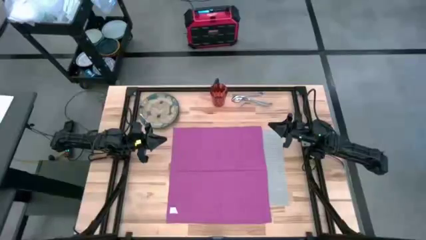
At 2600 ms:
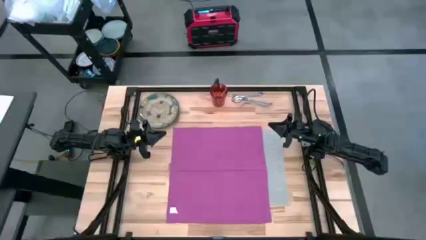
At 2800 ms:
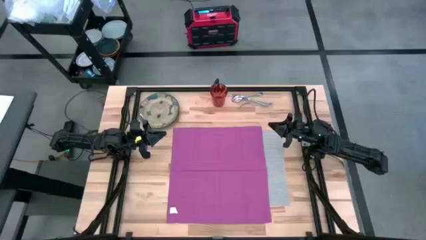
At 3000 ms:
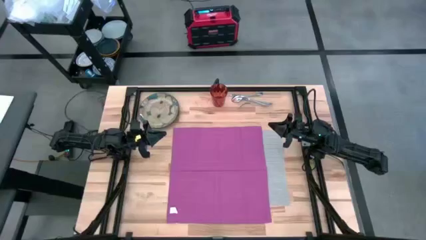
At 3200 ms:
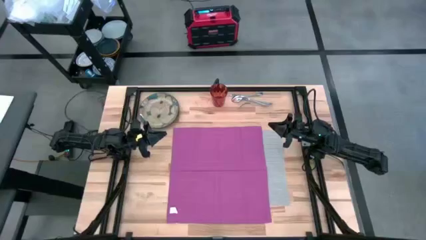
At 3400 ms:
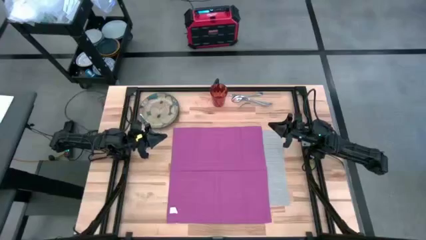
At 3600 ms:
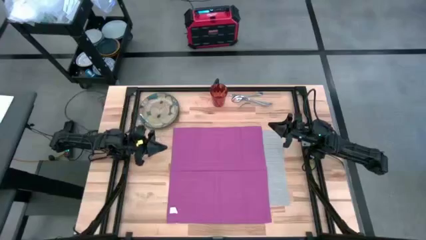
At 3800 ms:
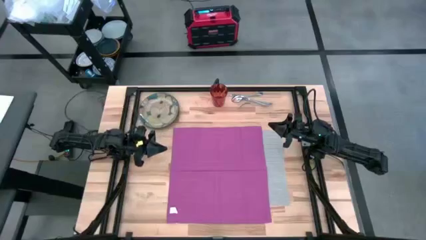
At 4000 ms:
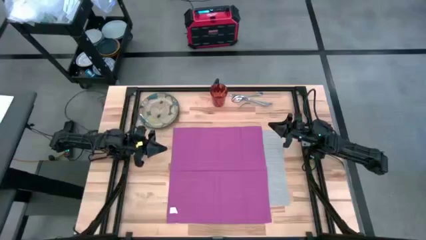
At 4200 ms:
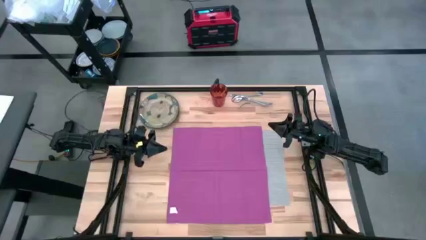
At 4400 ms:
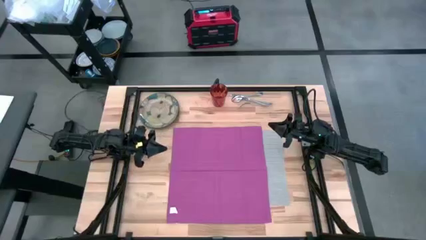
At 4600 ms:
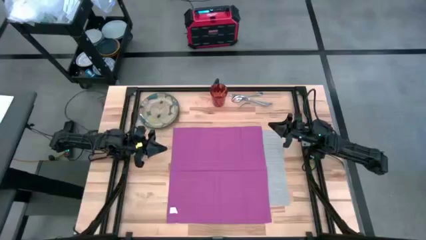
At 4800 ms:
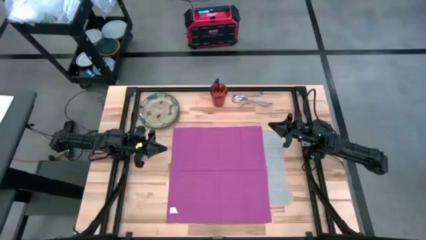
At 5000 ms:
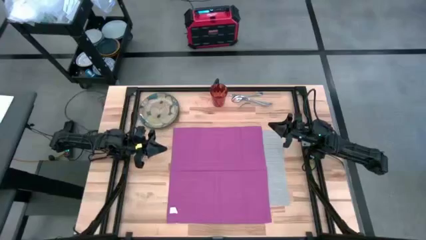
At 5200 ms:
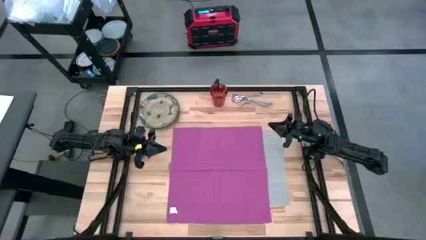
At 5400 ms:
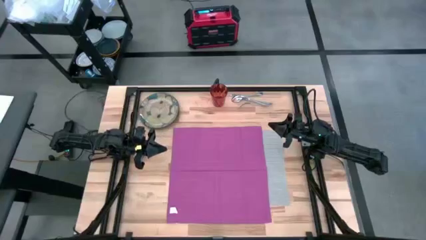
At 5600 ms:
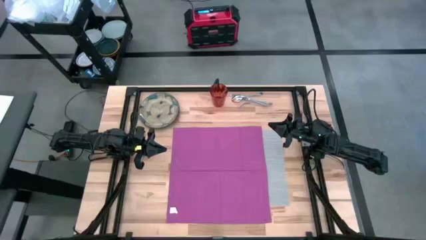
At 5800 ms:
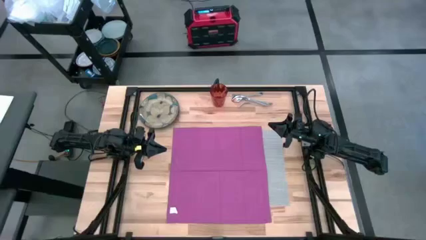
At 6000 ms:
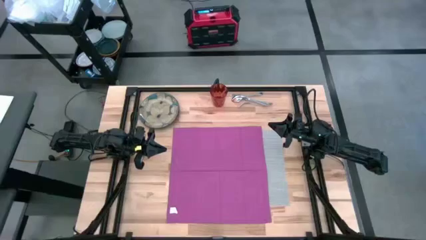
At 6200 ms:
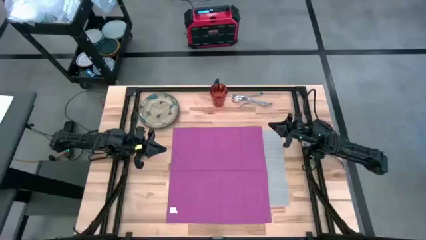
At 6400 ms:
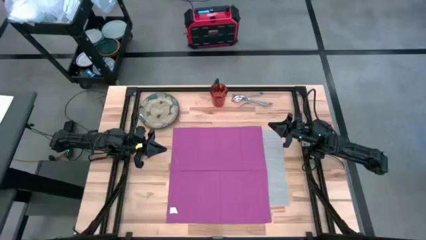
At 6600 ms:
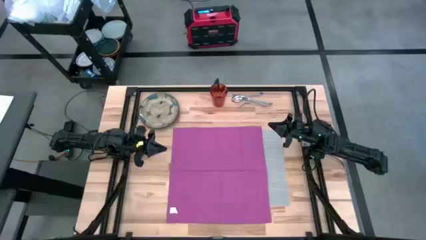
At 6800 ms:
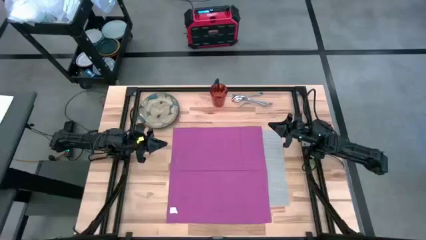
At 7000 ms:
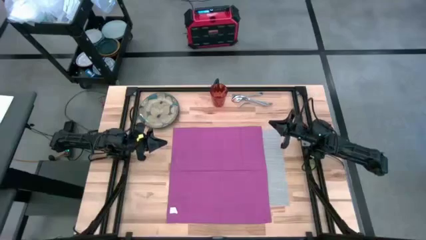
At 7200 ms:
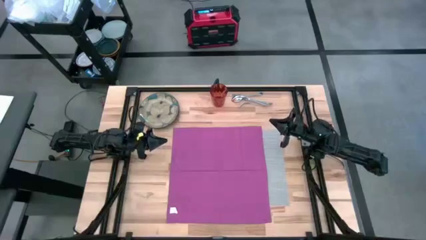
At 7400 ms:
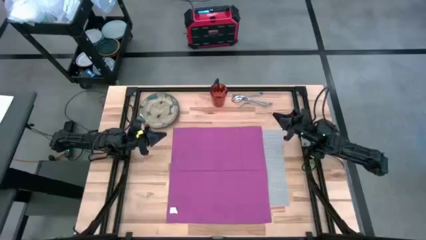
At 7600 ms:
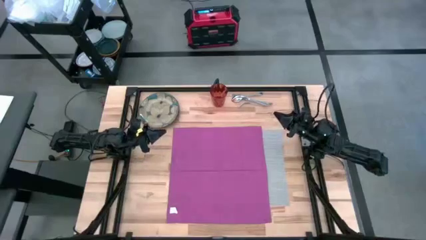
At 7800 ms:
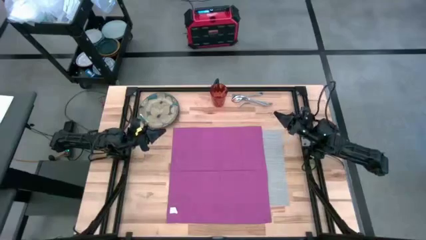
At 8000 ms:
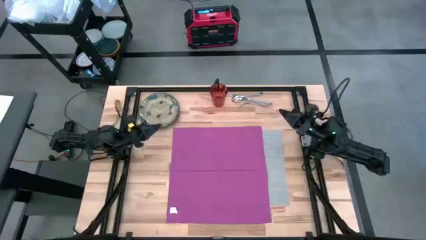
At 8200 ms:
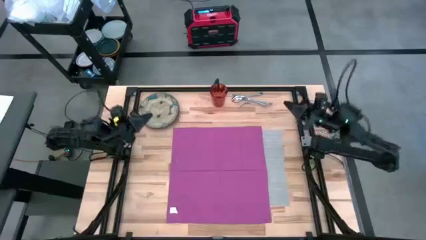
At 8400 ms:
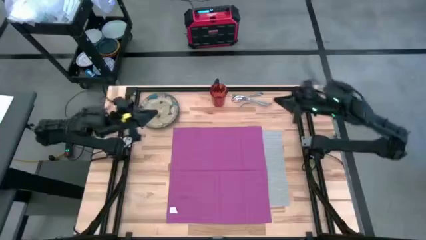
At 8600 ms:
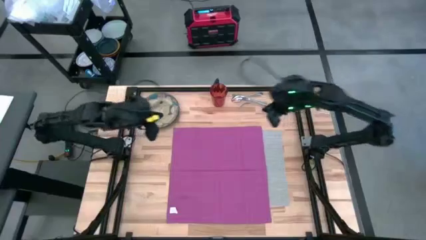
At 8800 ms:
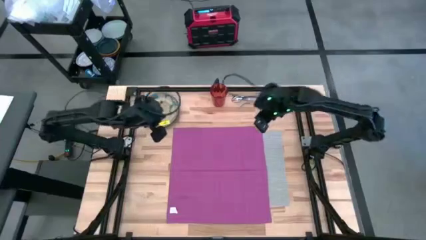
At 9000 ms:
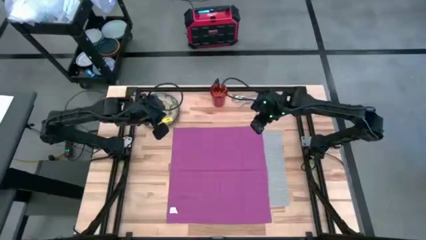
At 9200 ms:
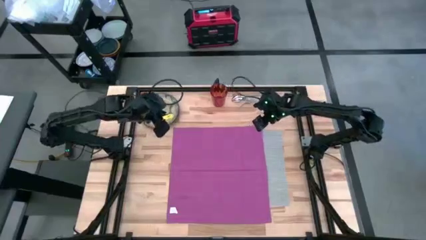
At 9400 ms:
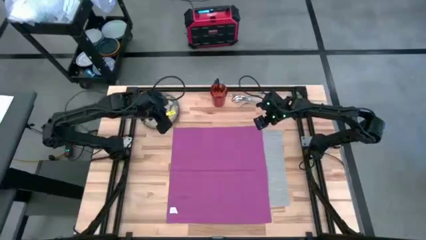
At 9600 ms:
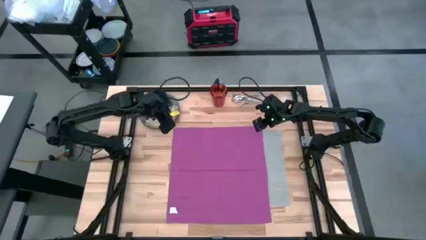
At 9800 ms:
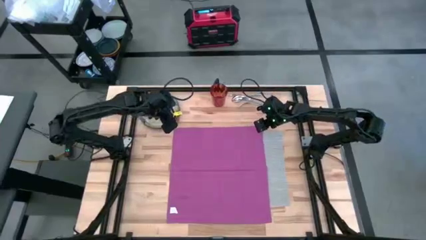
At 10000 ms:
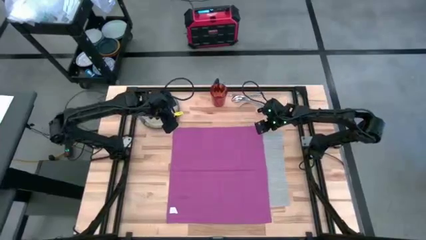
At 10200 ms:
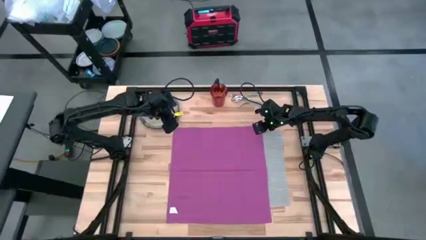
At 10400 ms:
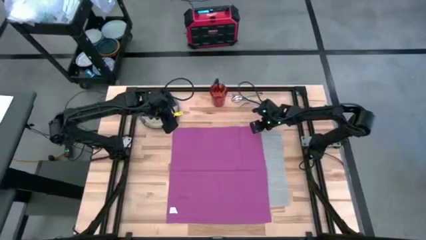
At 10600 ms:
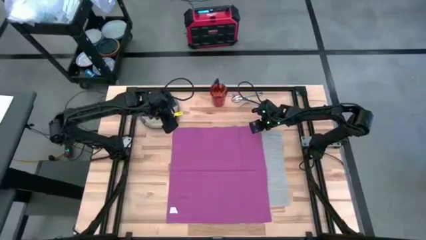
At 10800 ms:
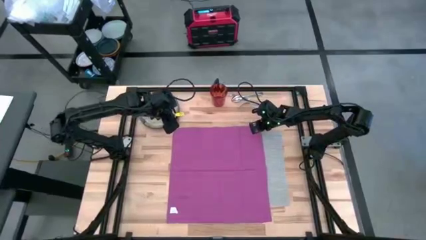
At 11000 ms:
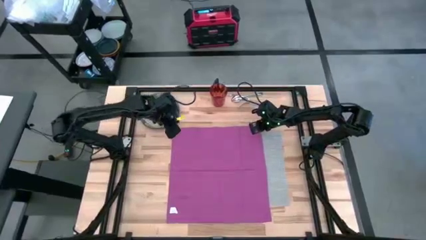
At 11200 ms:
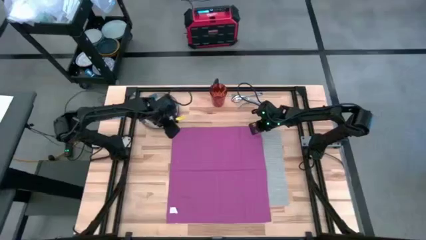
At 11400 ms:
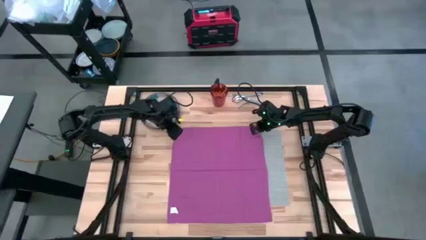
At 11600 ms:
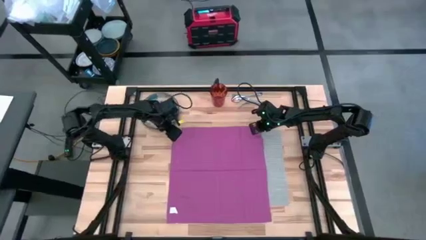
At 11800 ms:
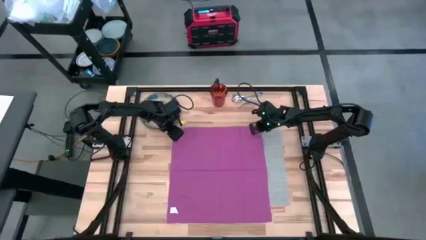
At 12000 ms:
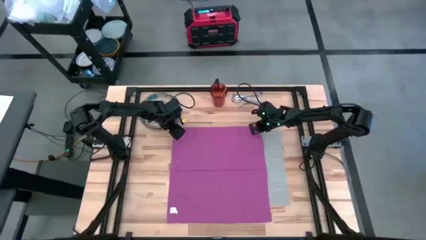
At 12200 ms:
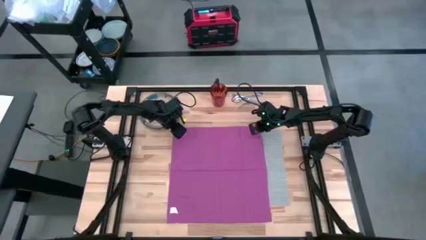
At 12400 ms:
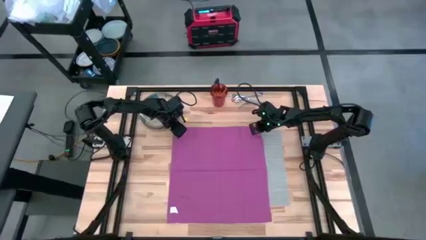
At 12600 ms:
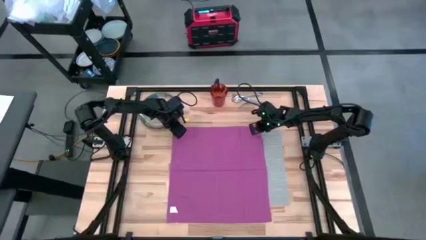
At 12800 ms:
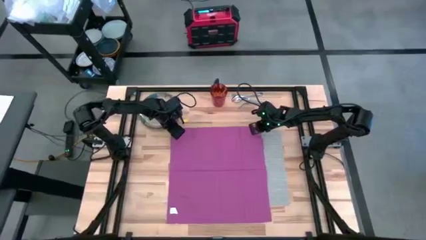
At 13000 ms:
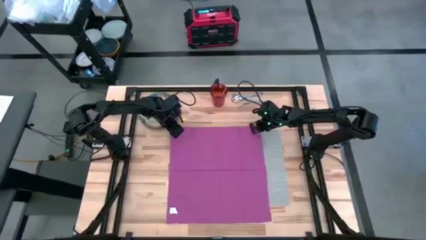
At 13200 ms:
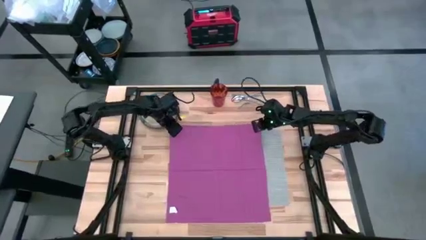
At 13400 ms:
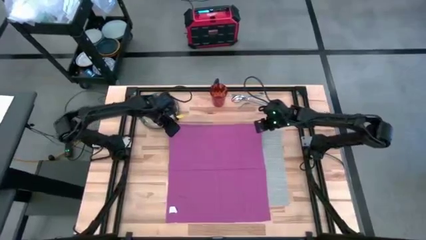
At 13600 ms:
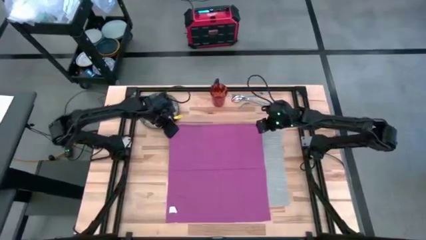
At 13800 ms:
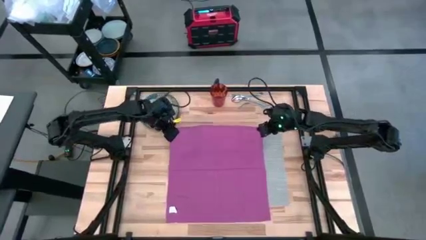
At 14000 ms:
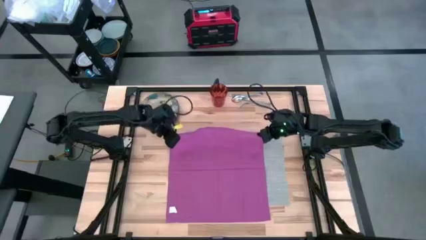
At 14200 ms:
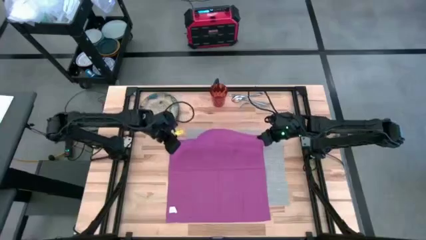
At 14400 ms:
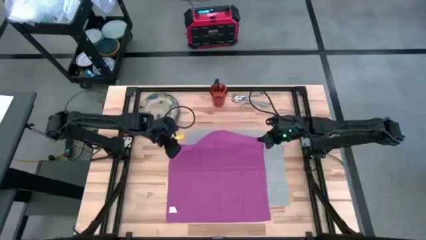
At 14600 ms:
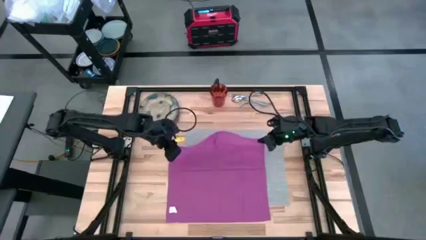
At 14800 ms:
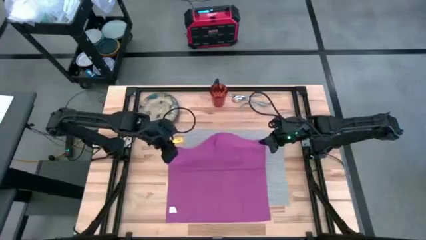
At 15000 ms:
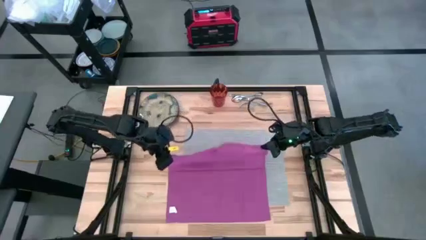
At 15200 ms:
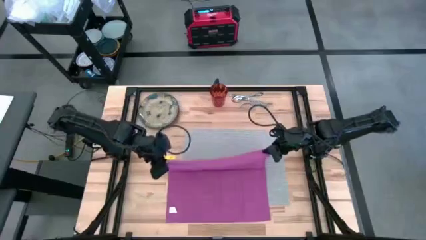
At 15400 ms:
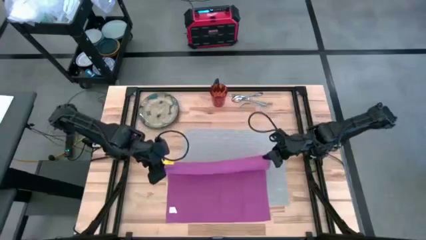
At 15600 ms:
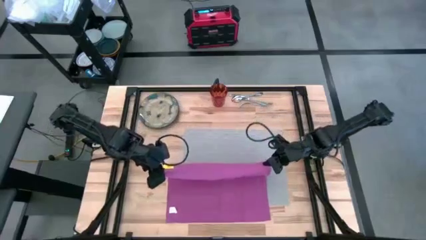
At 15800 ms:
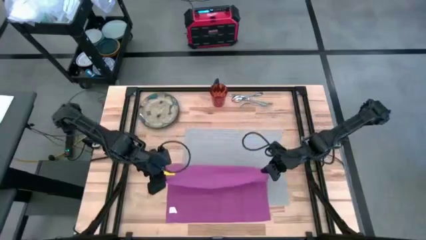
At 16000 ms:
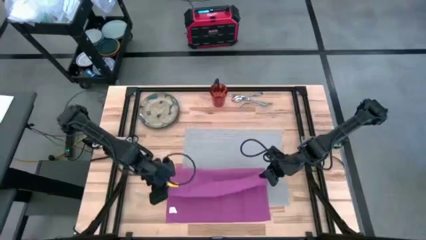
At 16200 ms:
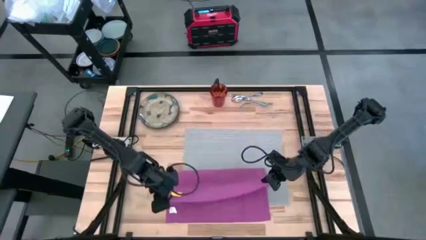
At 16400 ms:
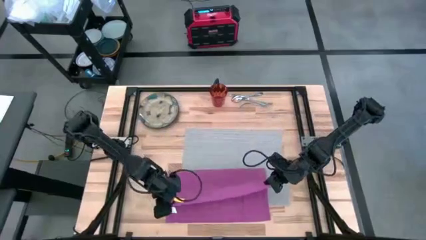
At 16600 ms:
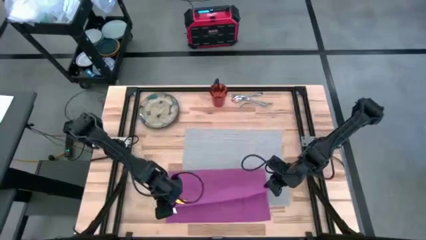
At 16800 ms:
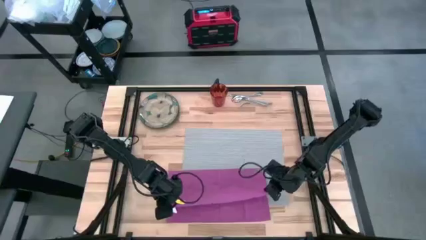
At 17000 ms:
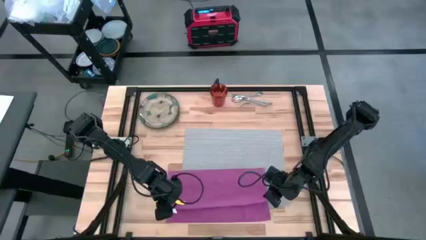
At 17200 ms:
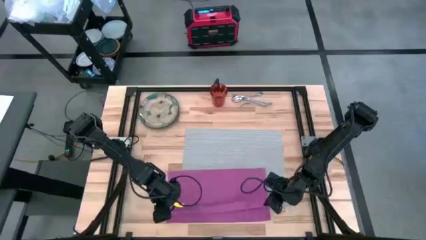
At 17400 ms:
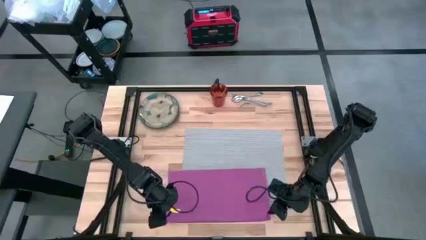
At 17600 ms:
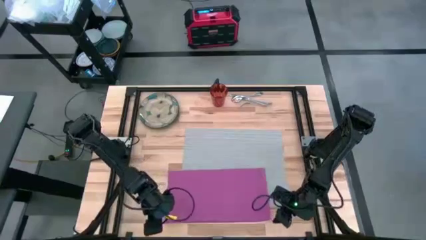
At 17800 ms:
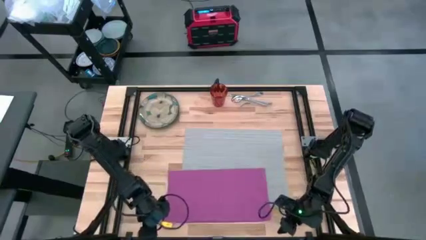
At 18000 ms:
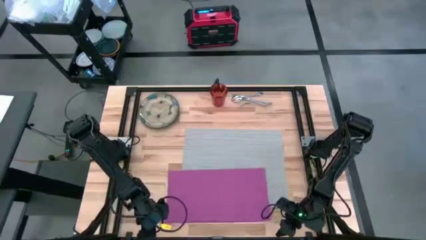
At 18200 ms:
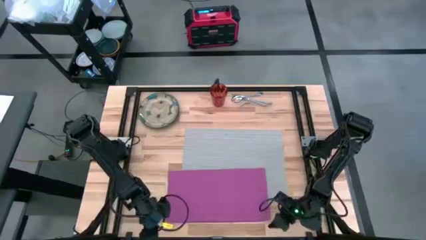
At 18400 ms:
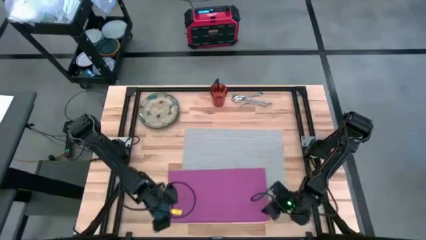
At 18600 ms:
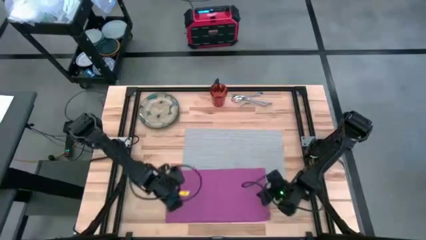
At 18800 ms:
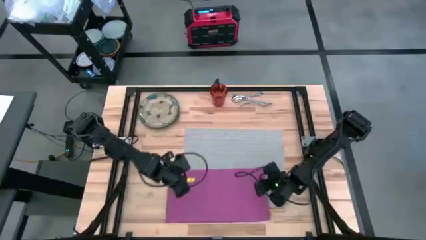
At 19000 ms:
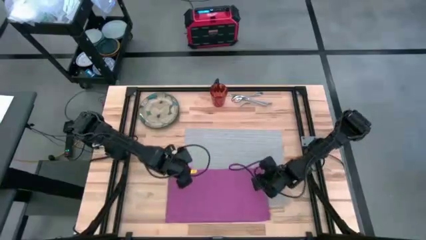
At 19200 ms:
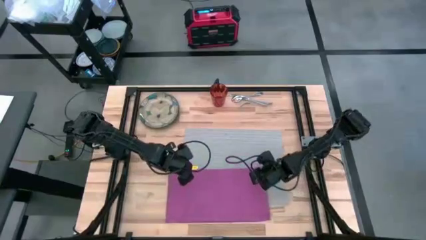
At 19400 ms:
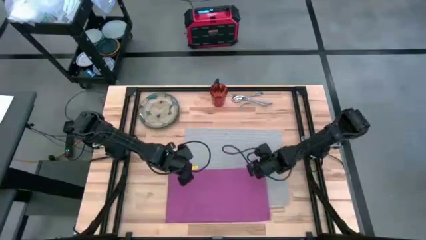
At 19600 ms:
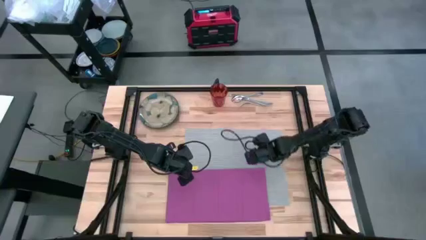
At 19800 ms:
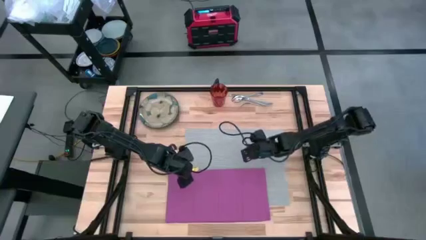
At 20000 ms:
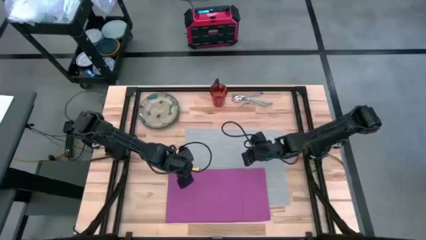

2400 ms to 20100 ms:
Task: Set table place
Fold the pink table napkin
